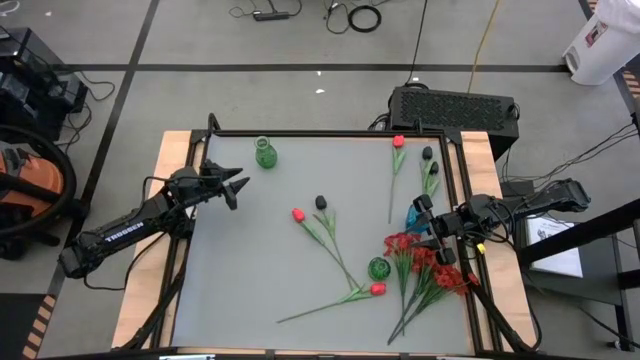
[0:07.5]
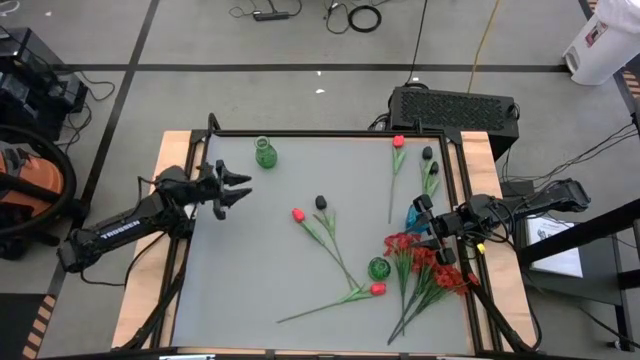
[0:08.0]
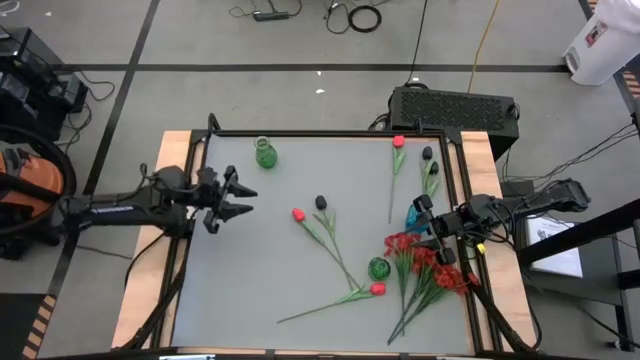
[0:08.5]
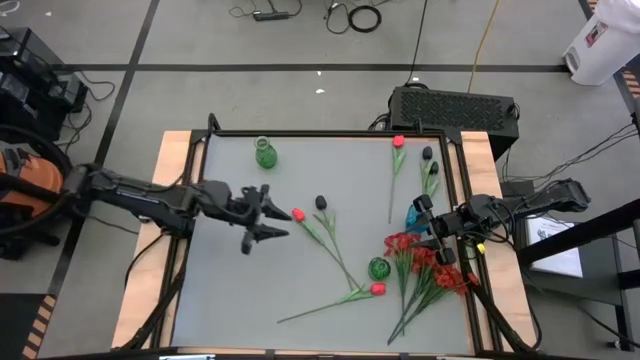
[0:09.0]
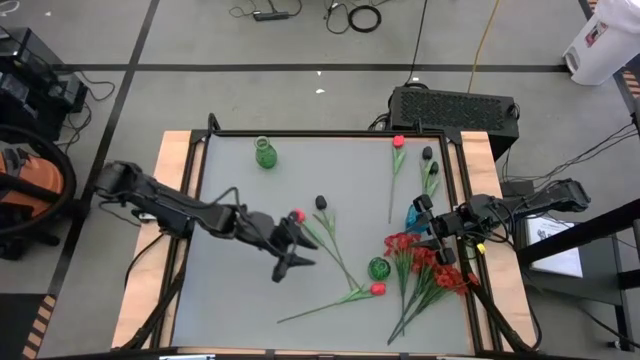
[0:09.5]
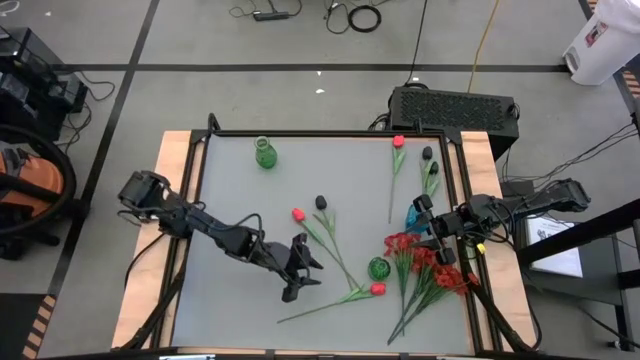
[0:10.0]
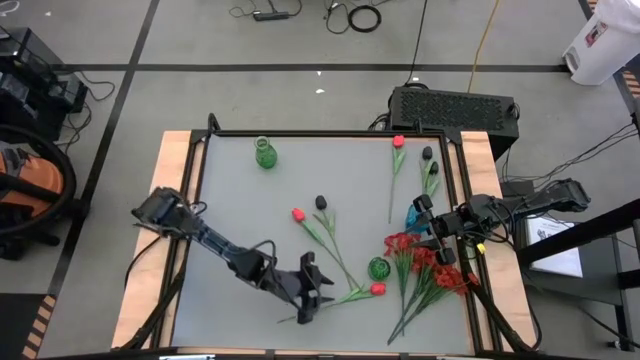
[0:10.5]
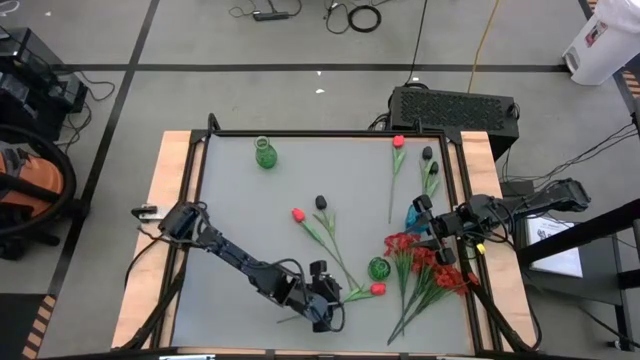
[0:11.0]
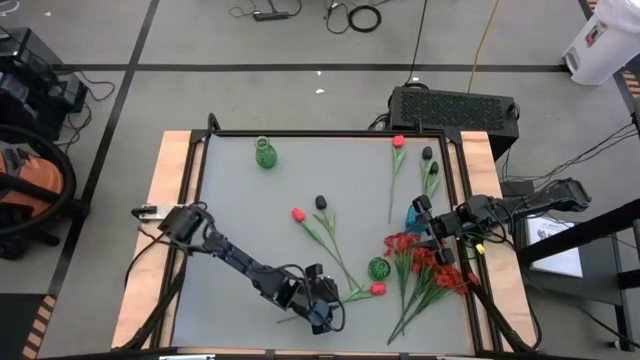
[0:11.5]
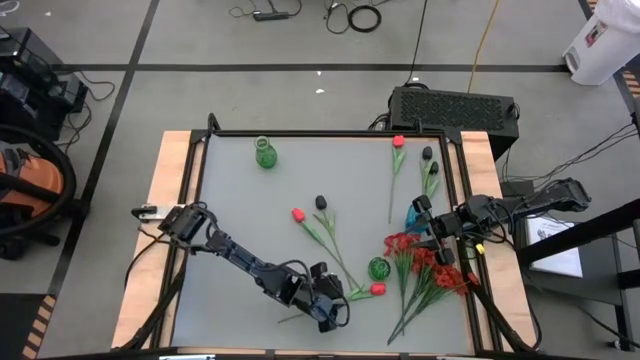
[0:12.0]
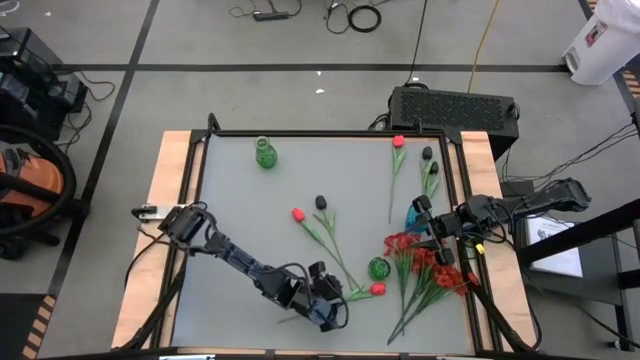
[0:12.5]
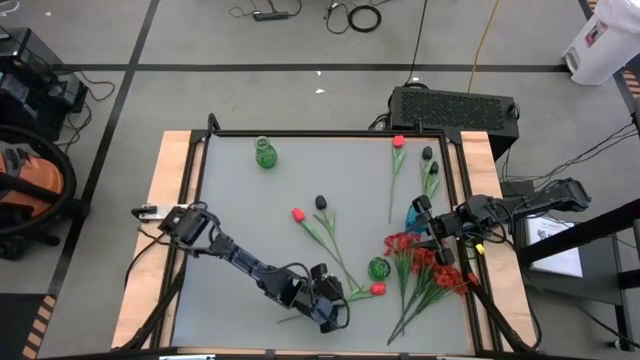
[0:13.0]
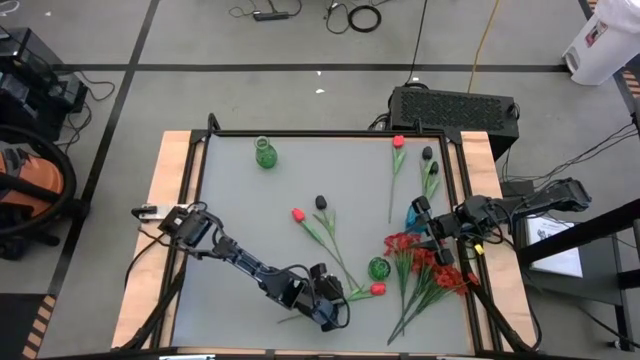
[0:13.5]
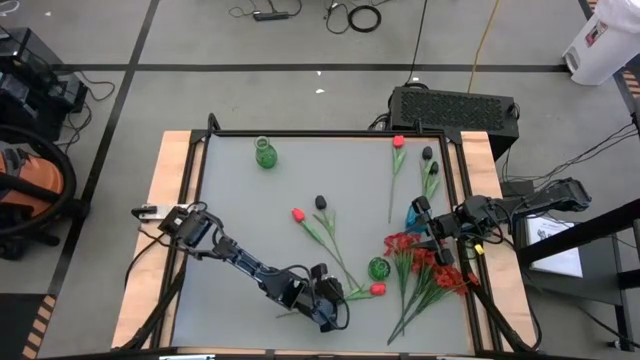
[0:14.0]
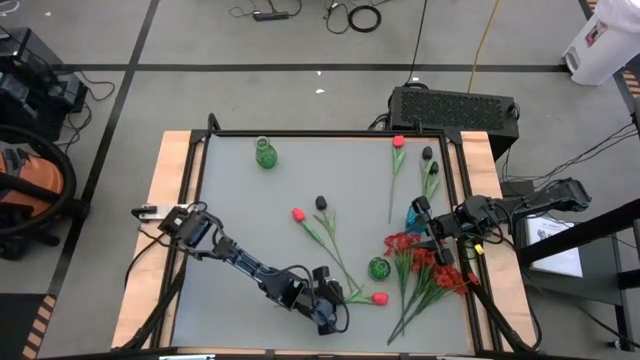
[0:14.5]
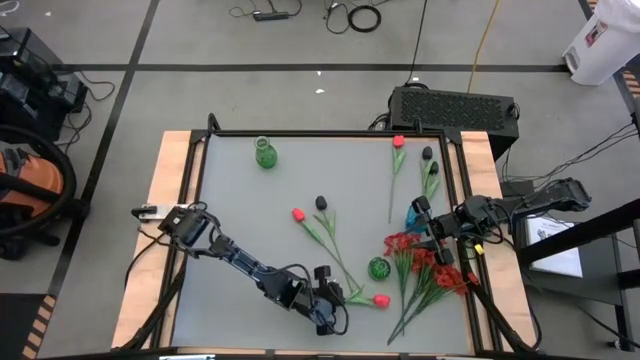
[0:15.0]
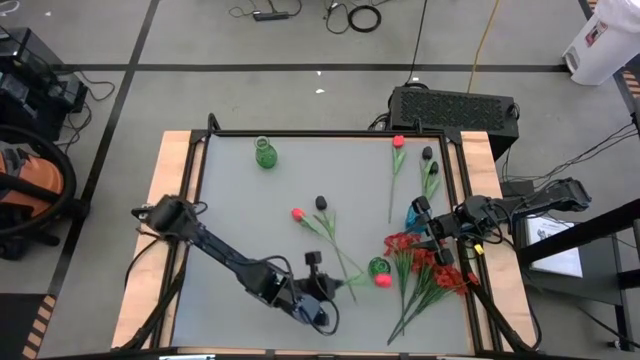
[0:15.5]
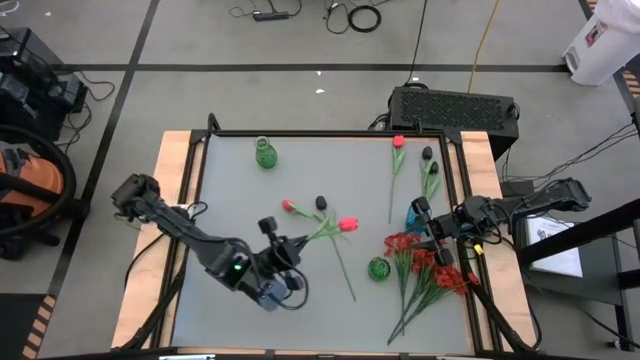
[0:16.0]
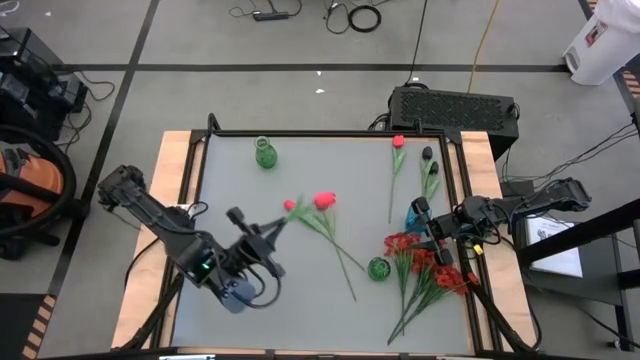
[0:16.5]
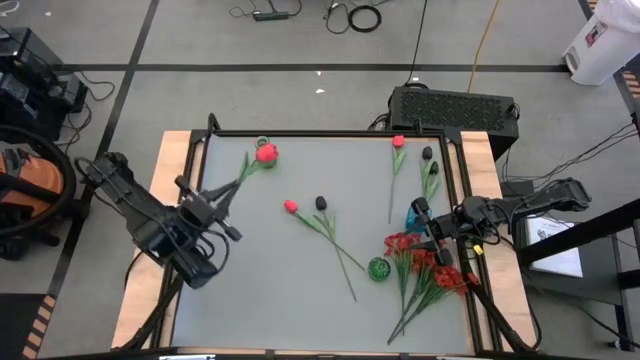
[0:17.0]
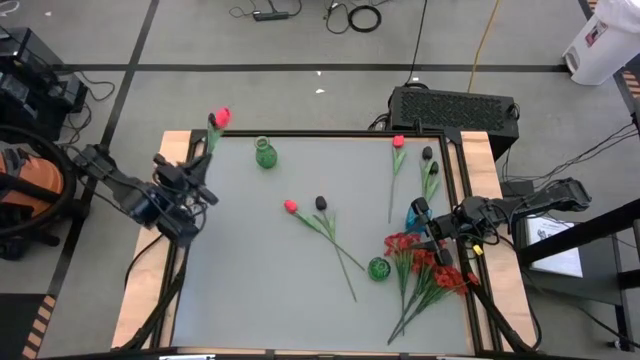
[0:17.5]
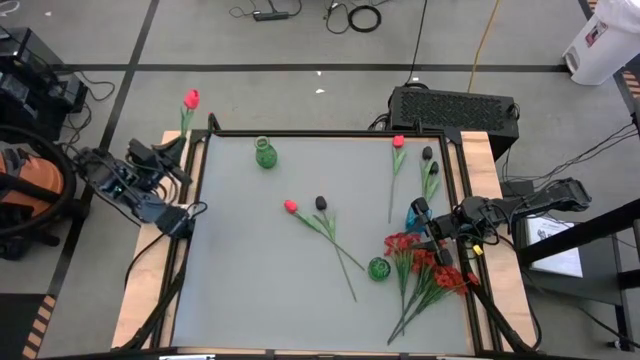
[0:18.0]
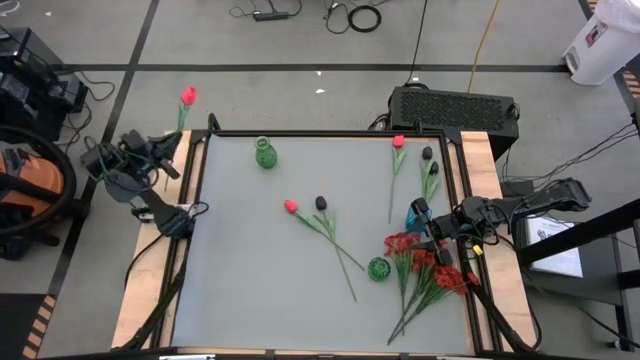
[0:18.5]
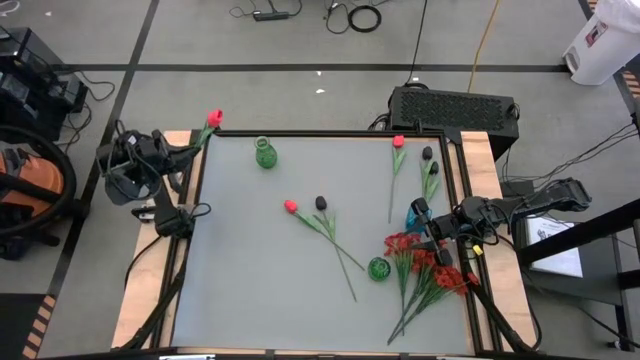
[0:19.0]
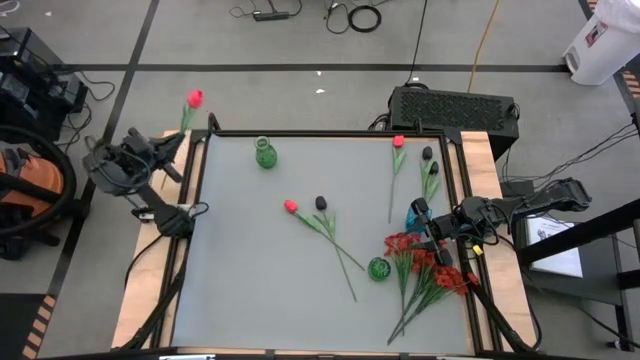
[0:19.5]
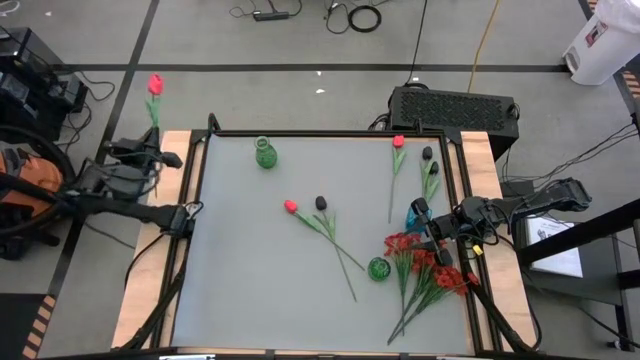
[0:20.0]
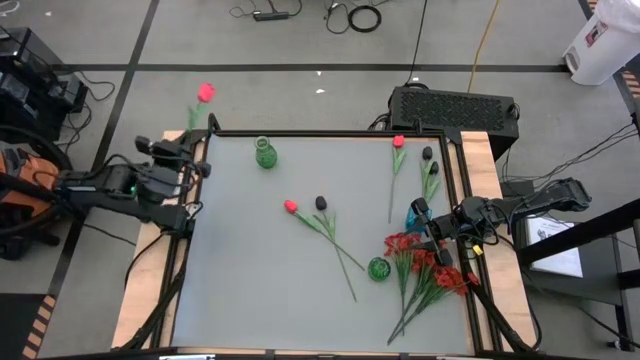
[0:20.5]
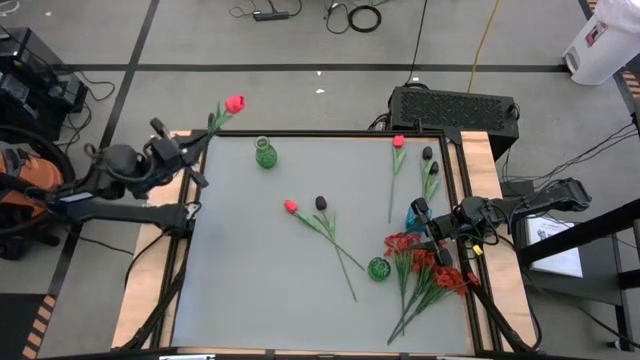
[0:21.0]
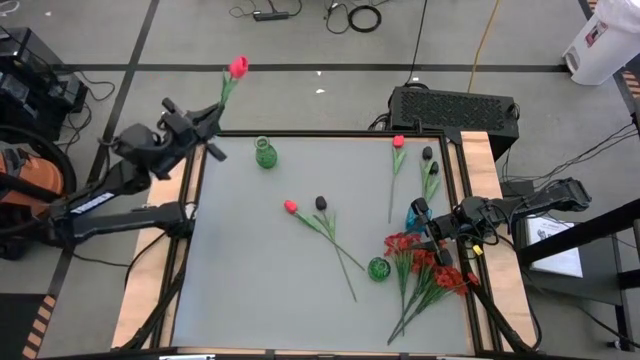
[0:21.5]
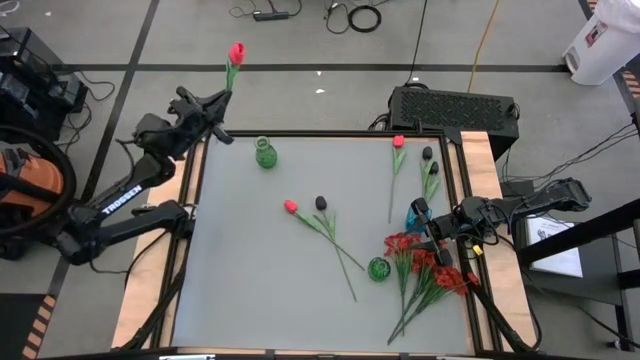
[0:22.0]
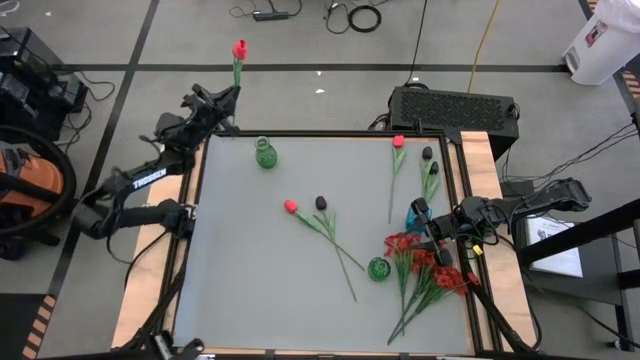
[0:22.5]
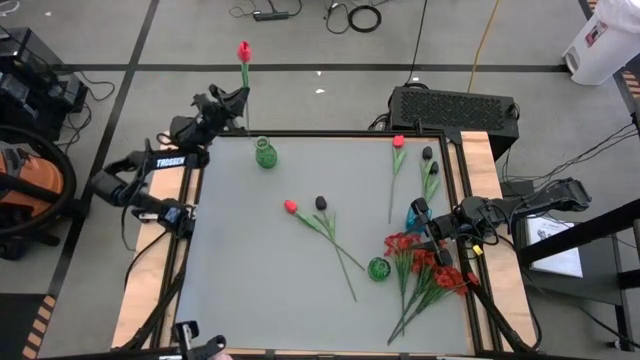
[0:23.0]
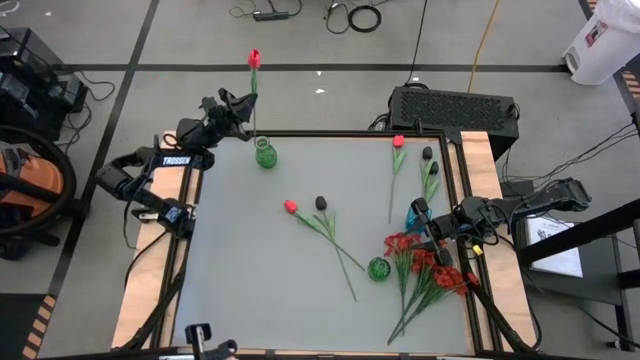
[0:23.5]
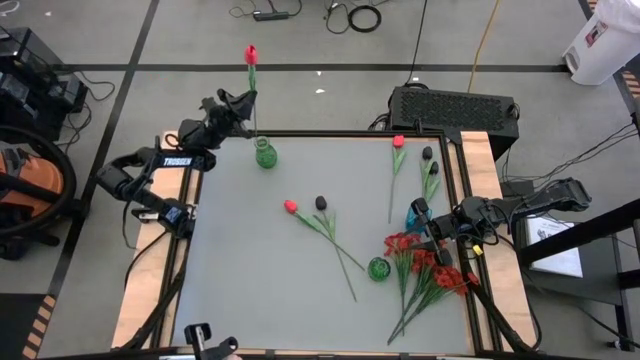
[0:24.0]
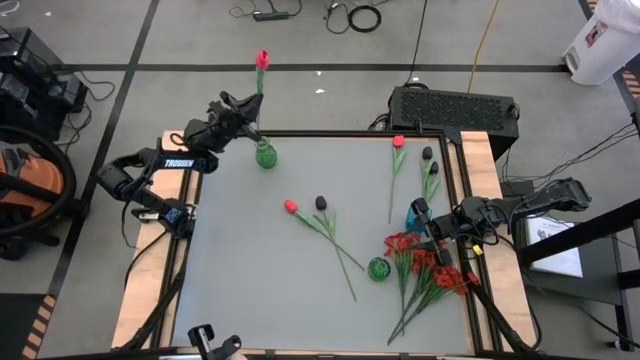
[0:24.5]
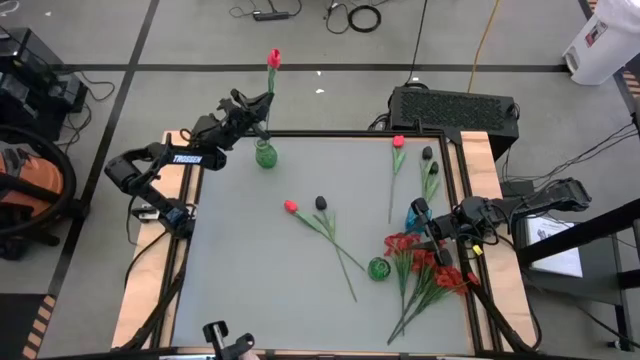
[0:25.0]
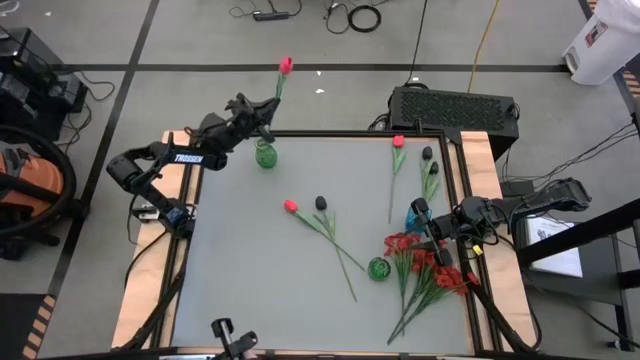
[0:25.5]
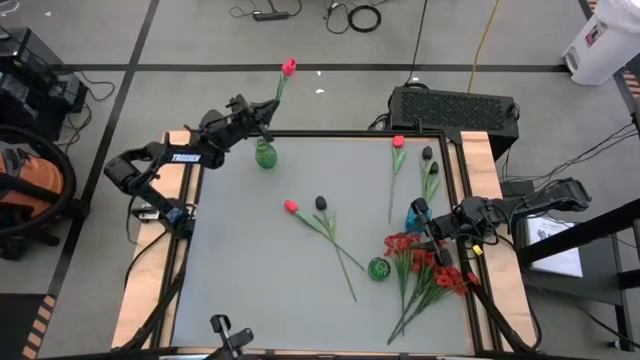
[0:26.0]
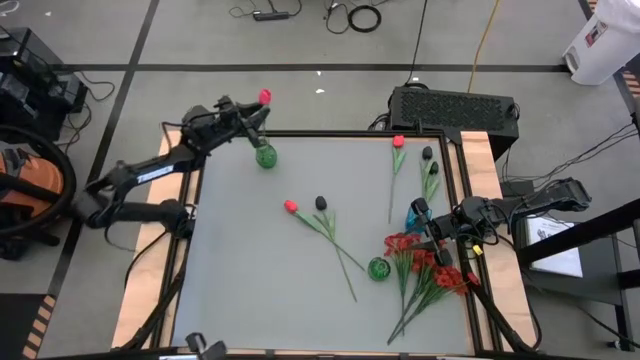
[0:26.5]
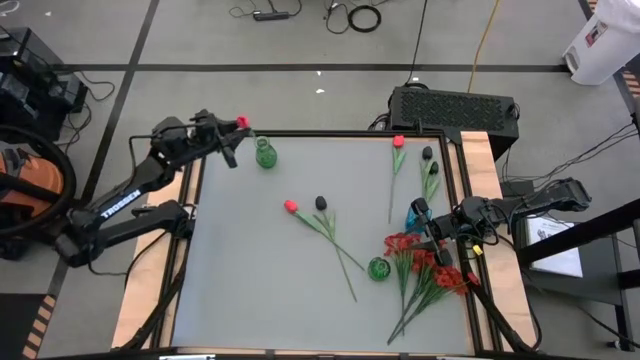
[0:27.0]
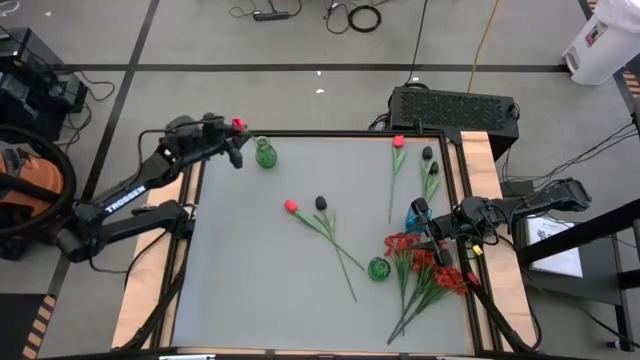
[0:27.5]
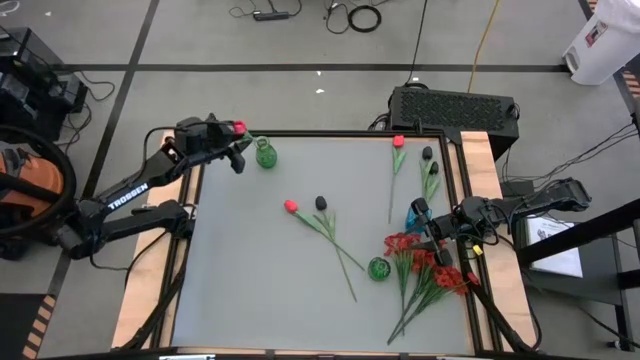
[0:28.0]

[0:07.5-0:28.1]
Task: Sort flowers into vase by color
Put the bottom pink flower into the top green vase
